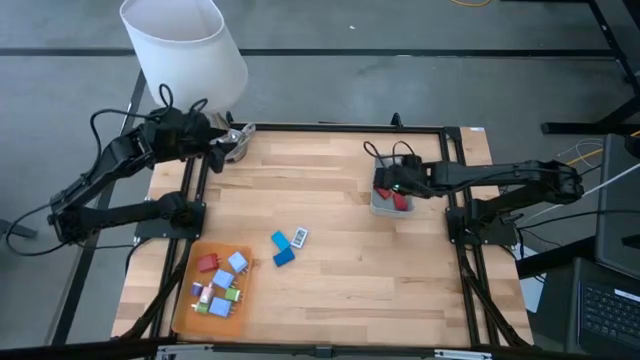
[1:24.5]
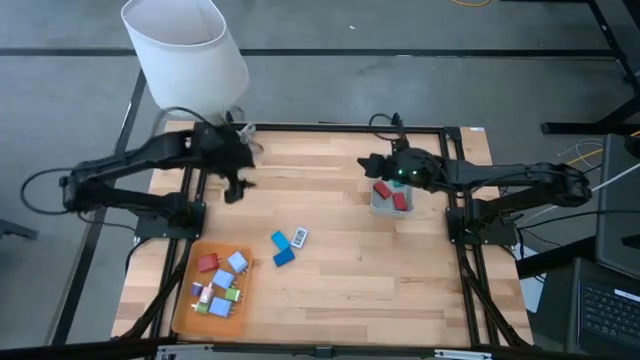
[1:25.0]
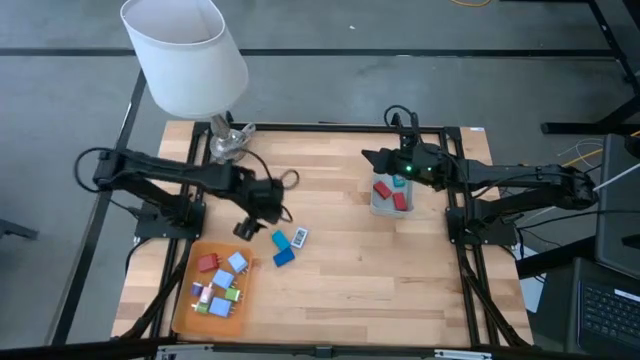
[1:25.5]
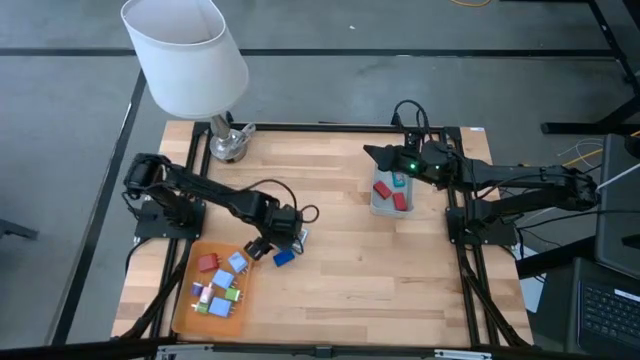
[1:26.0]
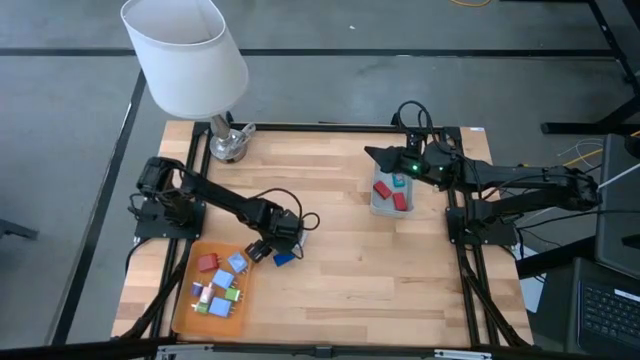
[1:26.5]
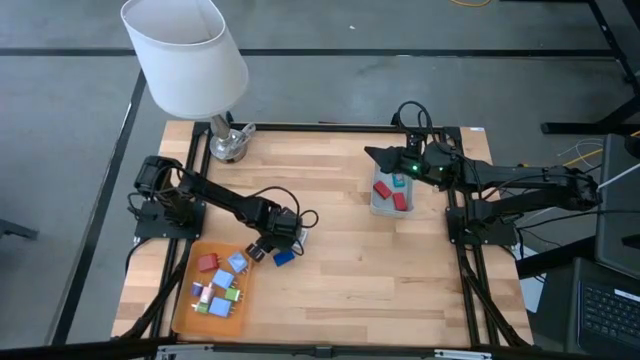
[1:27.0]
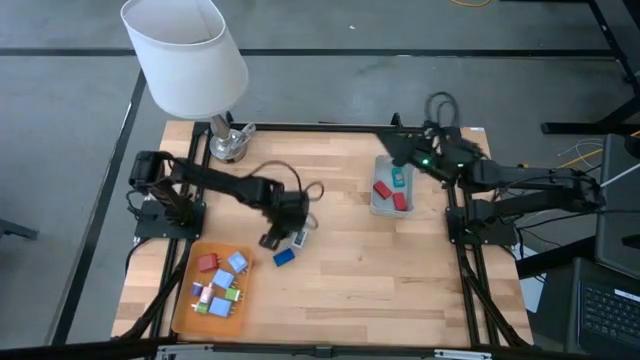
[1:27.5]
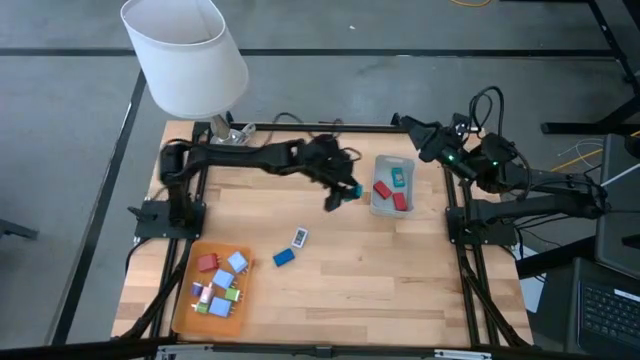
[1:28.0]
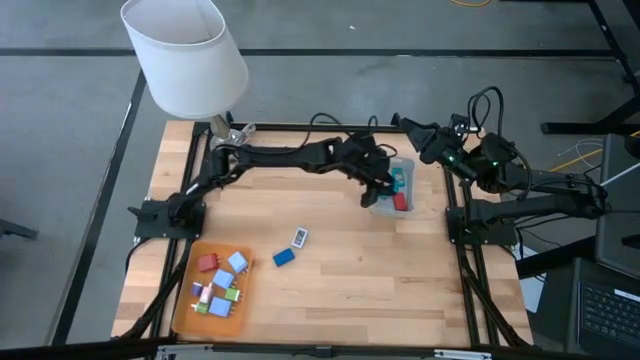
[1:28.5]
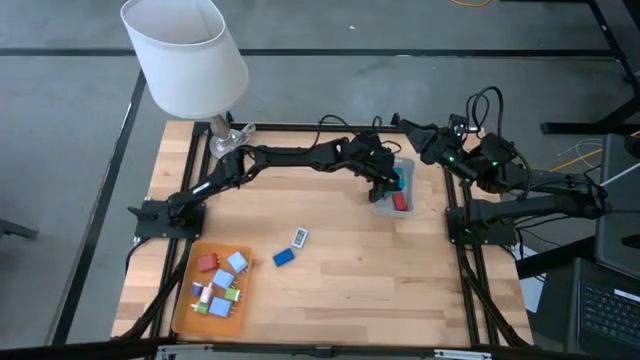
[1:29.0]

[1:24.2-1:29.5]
Task: Pick & Place Office items
Put the blue digital timer into the grey bin

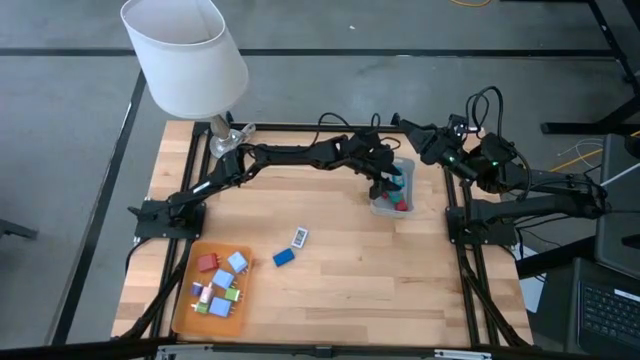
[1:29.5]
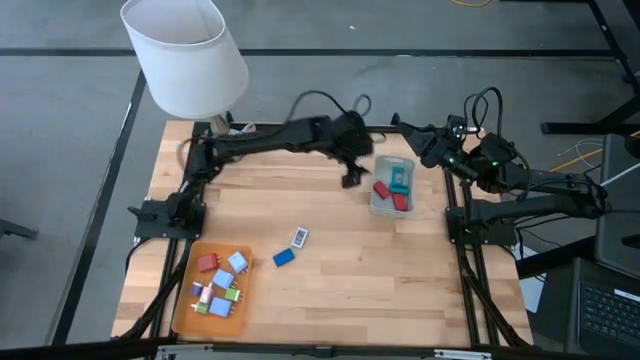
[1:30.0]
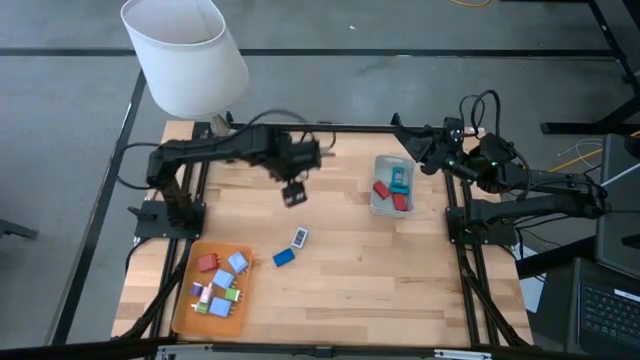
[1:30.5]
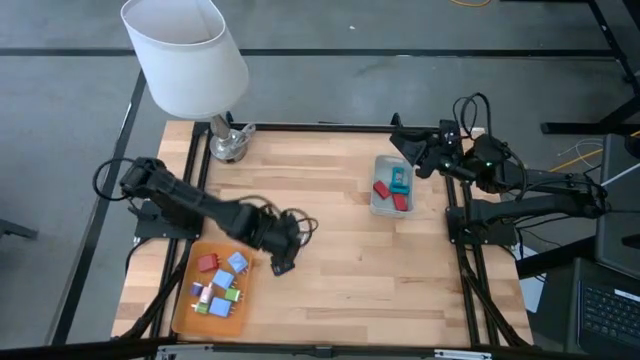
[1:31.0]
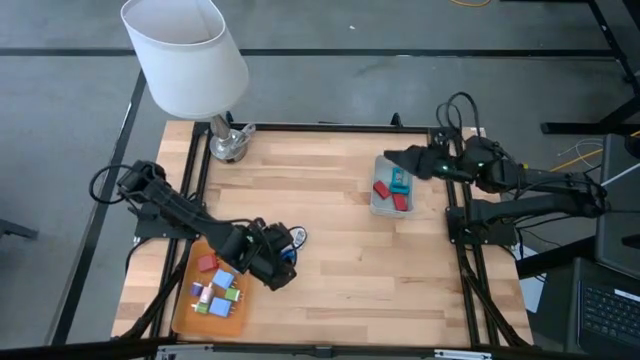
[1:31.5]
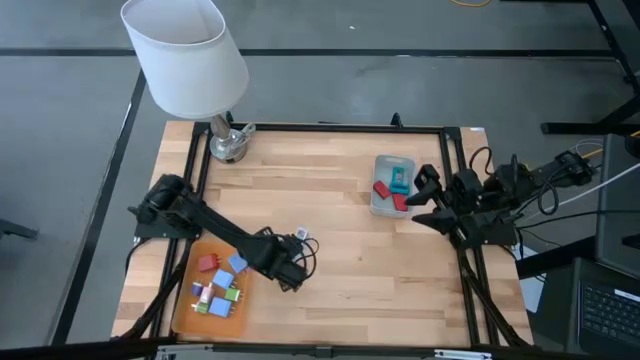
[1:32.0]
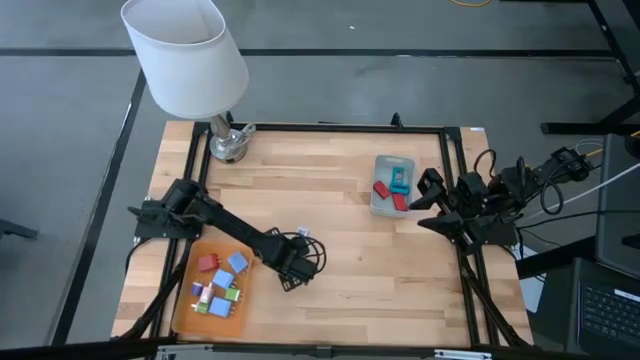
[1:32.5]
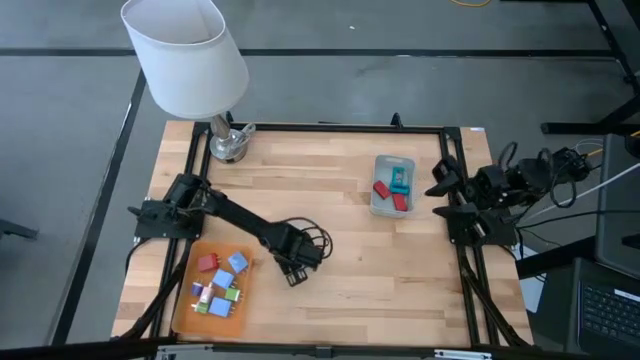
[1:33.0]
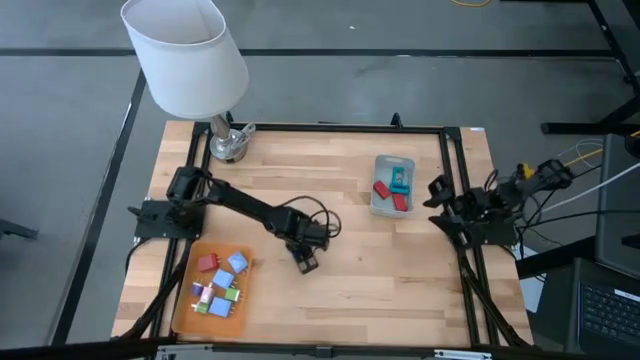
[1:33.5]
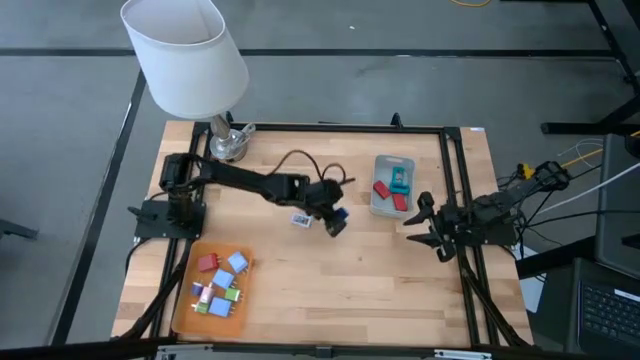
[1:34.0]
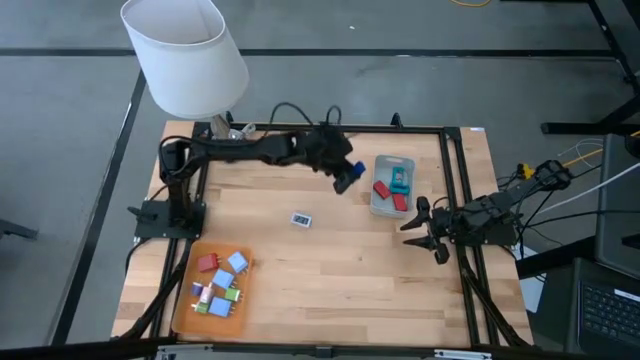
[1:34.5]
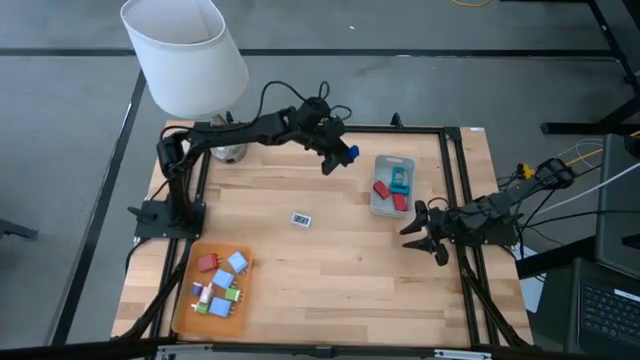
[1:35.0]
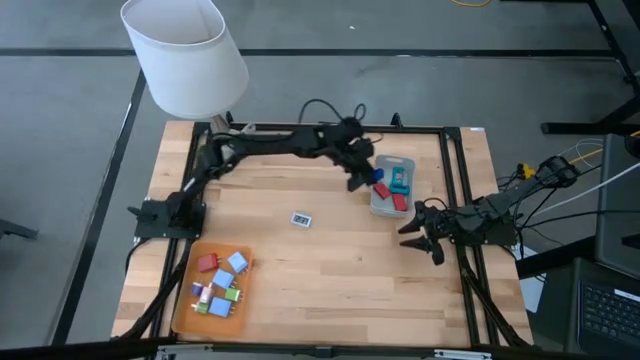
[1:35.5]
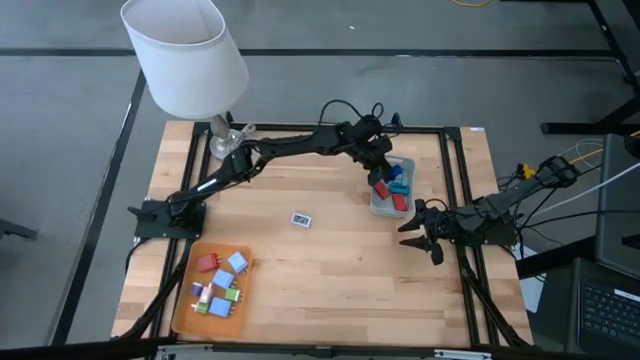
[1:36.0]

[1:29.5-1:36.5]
Put the dark blue digital timer into the grey bin

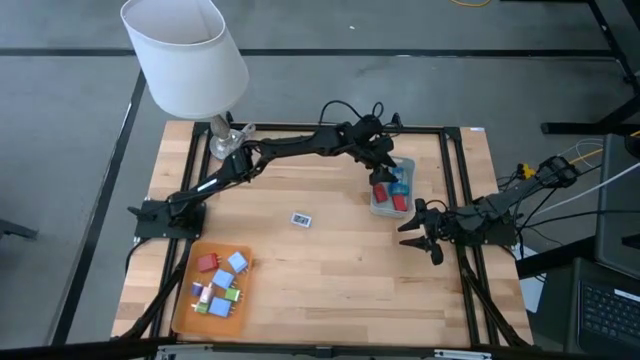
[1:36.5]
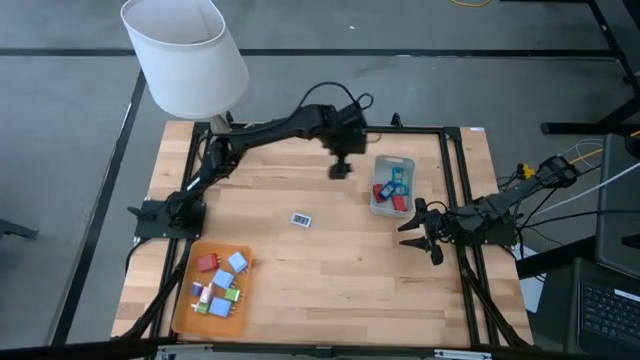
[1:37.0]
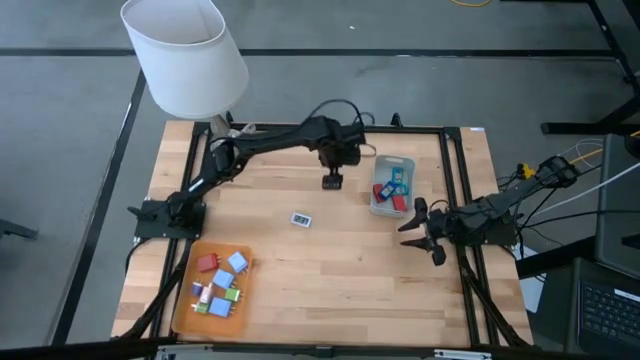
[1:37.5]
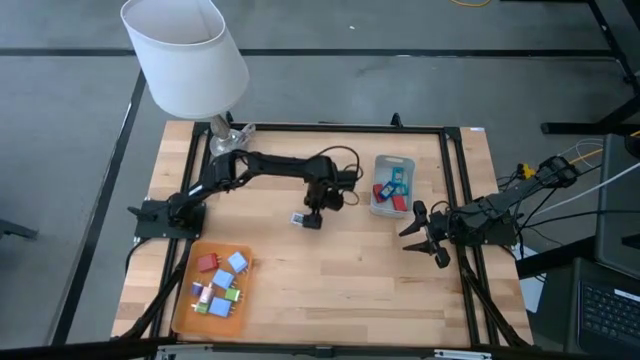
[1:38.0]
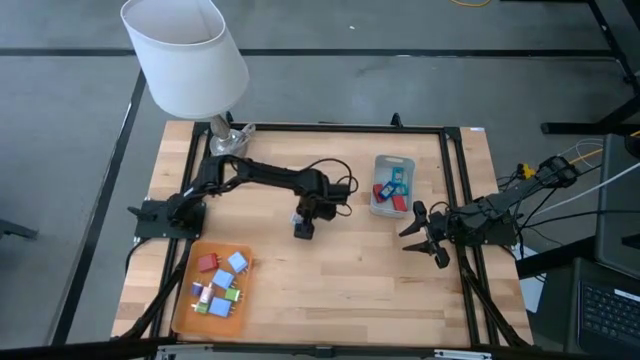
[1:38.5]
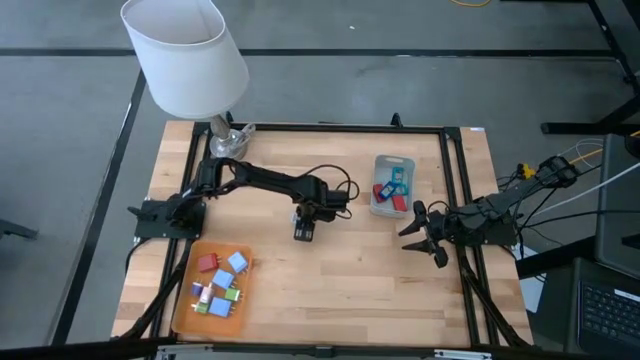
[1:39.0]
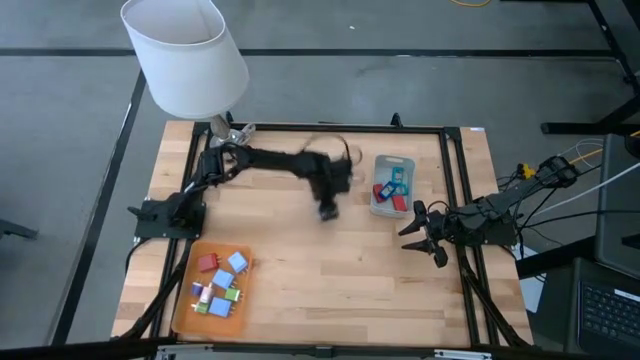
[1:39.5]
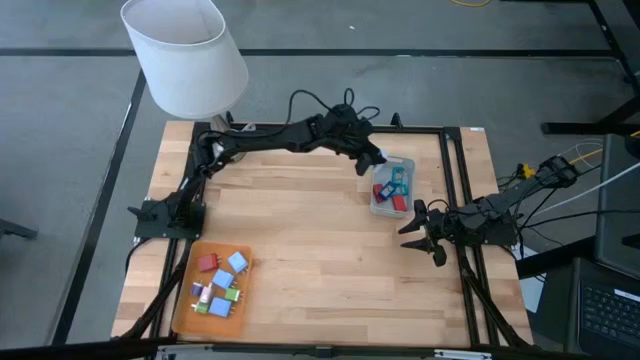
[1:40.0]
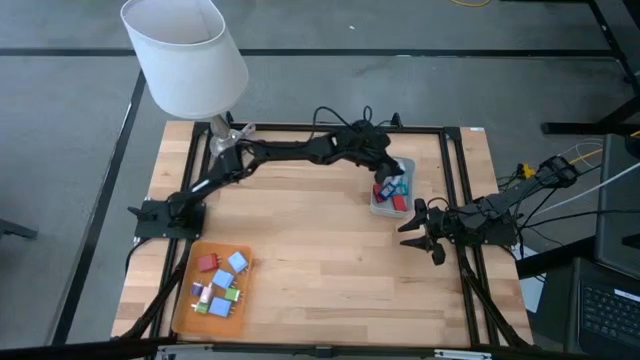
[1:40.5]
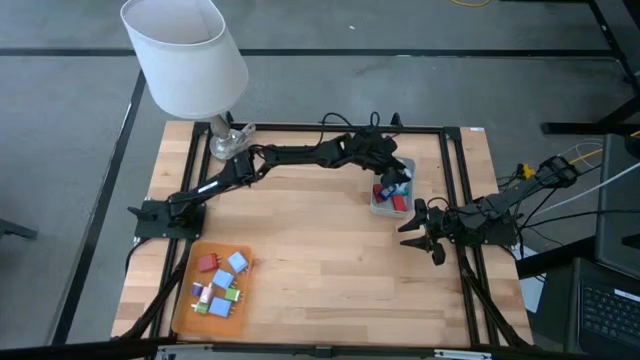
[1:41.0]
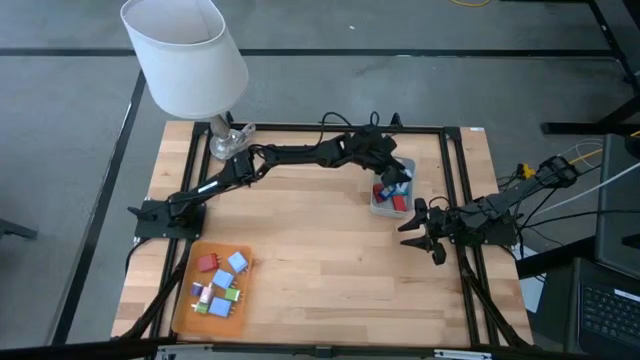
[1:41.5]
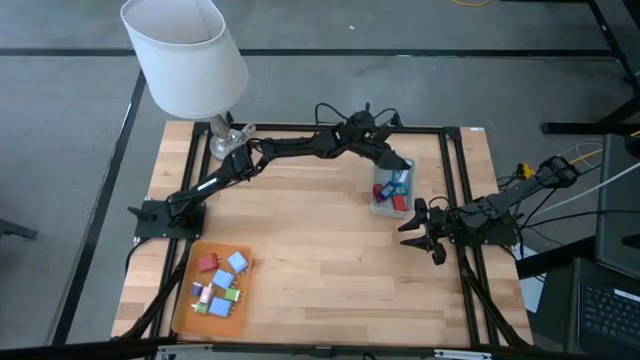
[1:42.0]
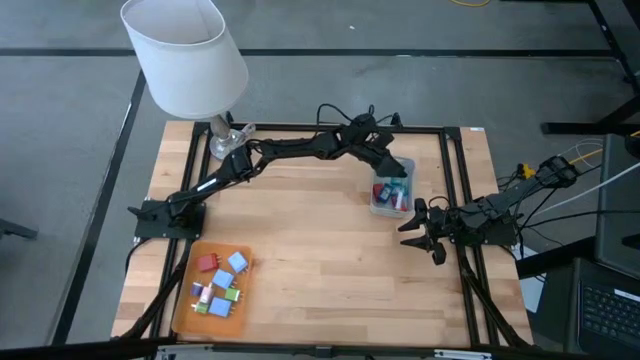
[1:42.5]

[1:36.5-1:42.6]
Put the white digital timer into the grey bin

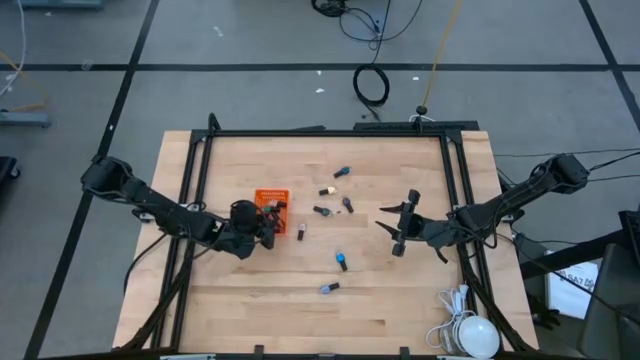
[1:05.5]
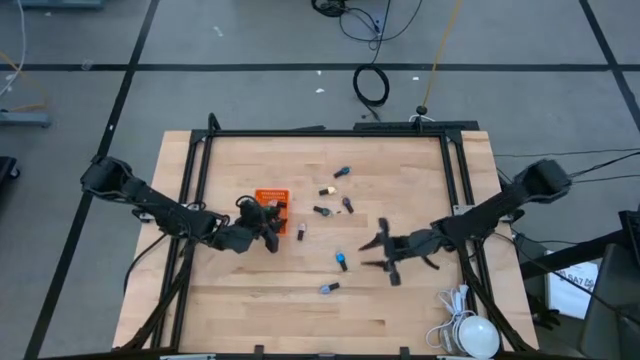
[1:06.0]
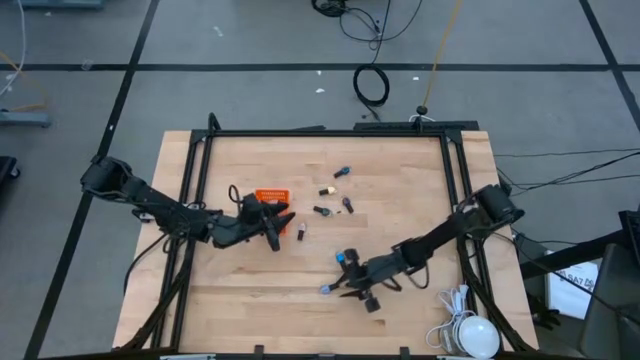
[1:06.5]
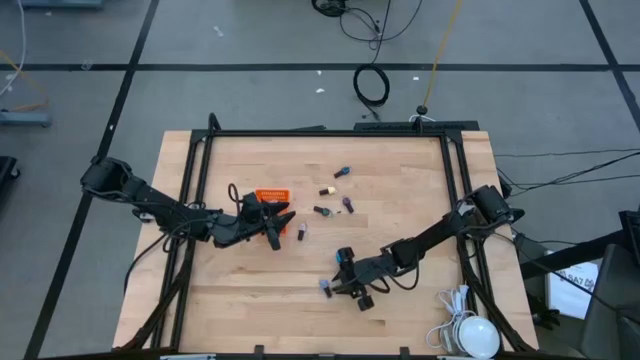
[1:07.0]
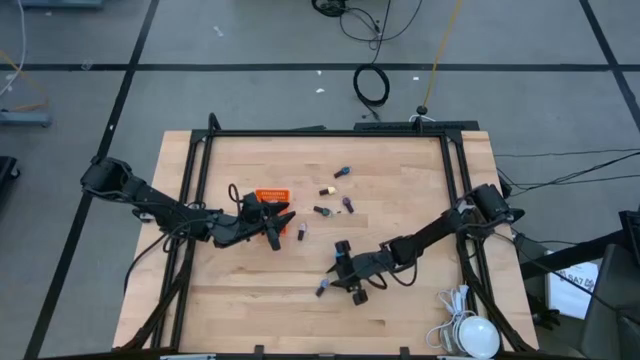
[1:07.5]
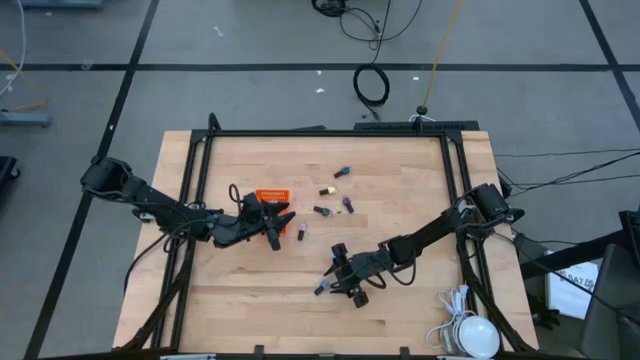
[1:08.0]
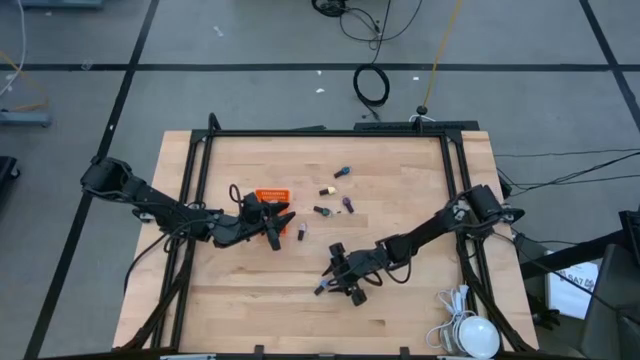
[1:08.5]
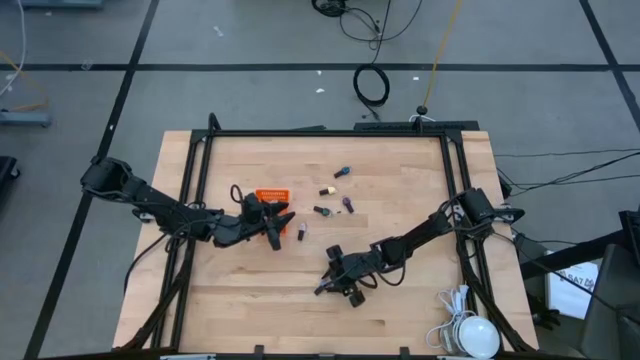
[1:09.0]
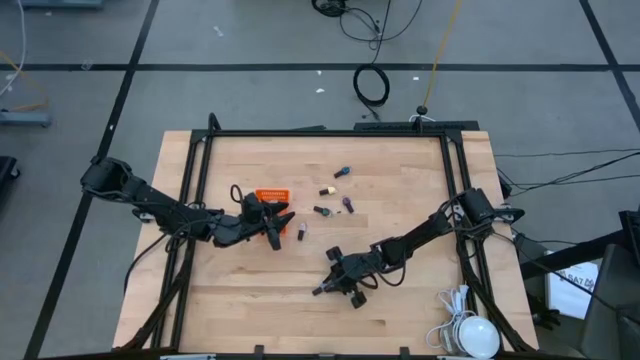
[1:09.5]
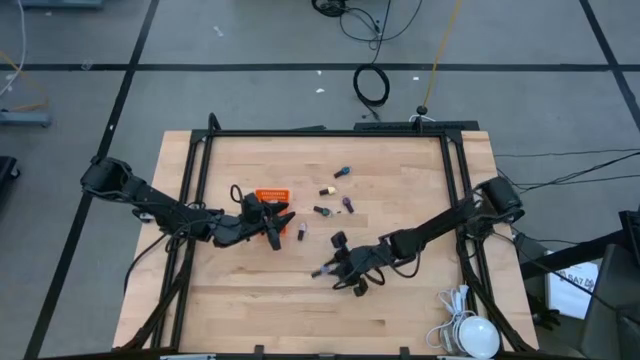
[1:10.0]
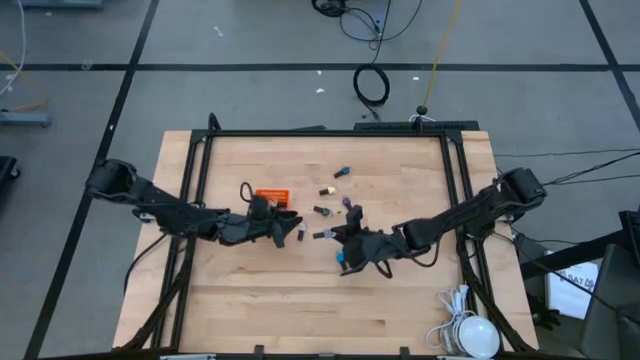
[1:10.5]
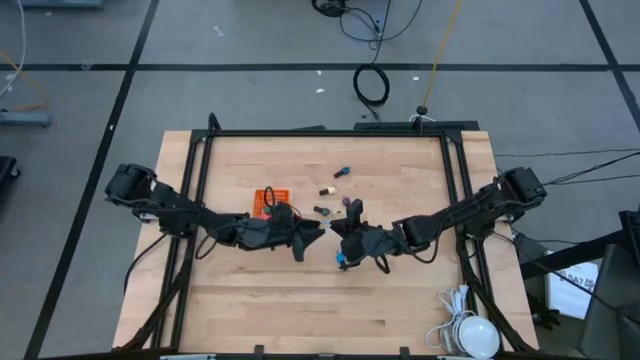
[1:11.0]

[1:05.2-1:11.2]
Task: Pick & Place Nail Polish
Put the purple nail polish into the orange basket
